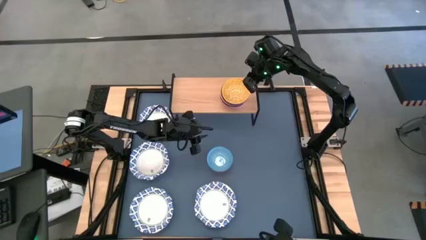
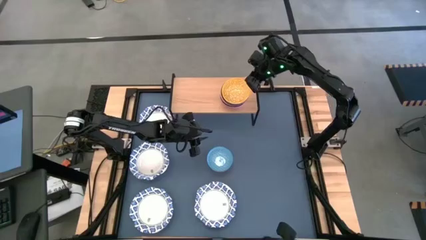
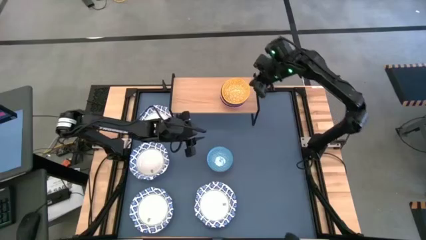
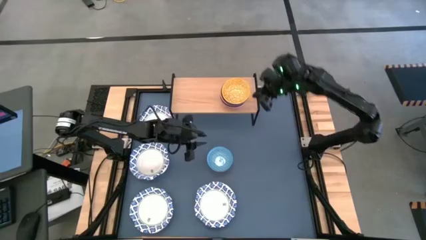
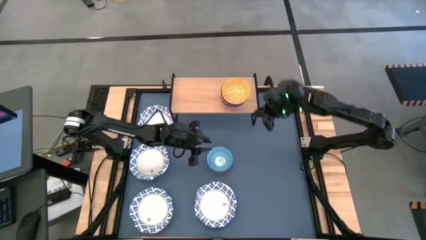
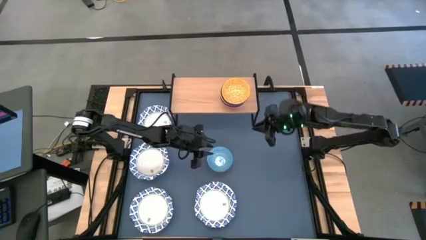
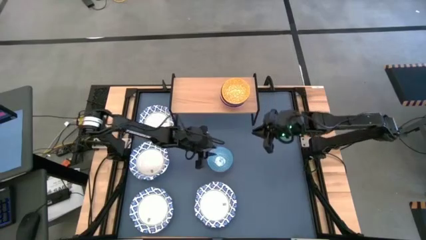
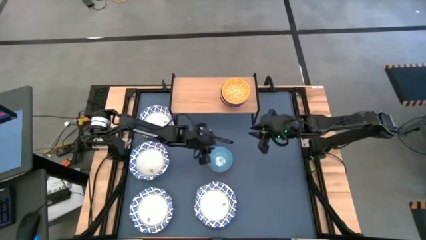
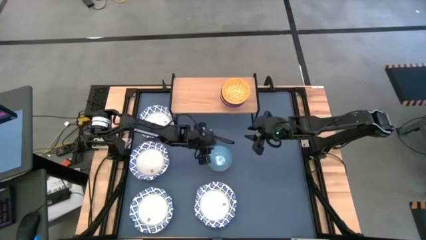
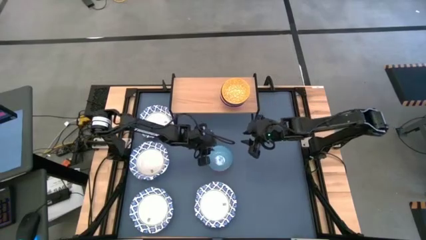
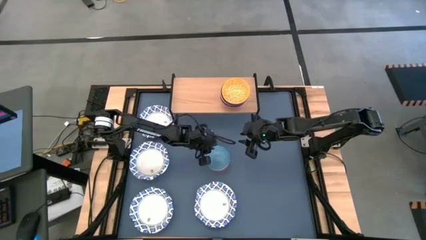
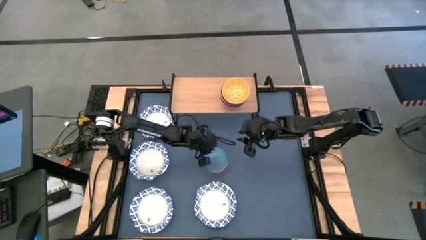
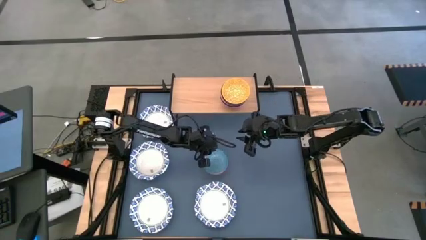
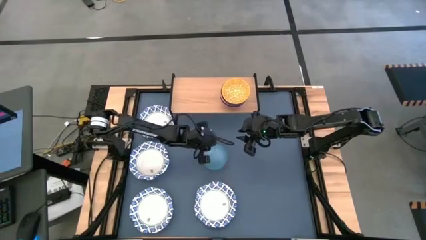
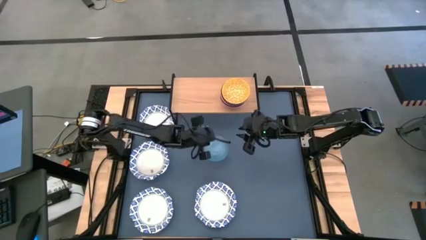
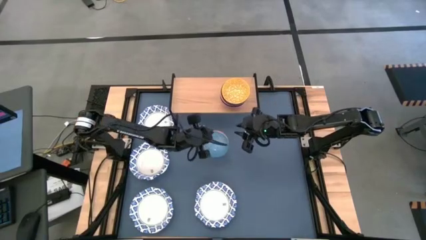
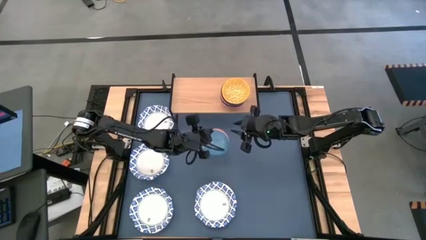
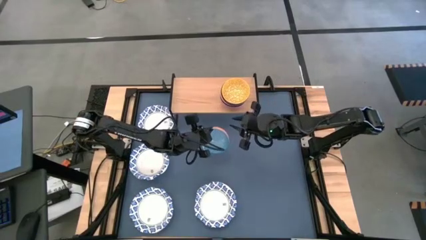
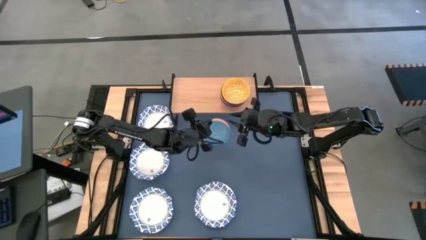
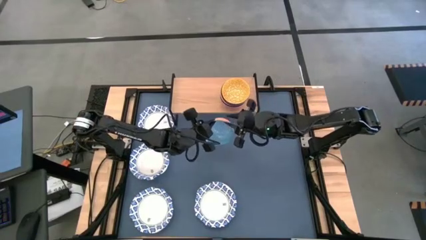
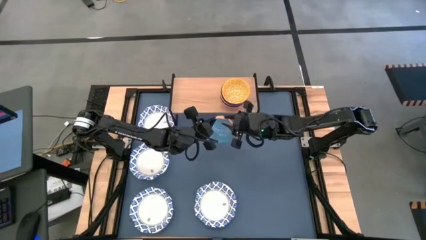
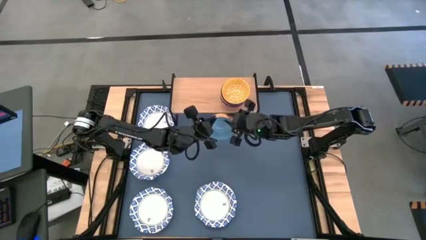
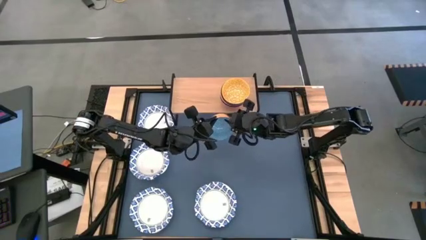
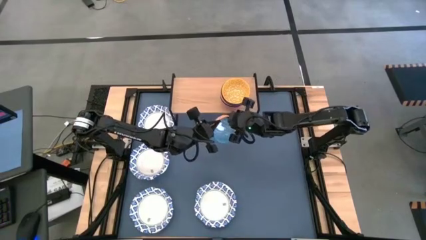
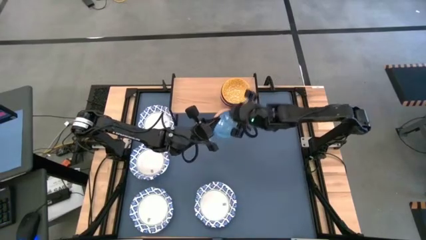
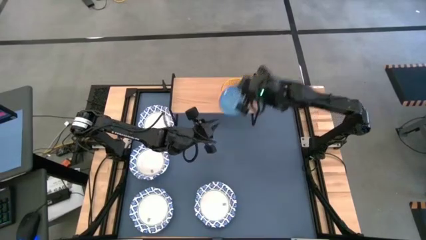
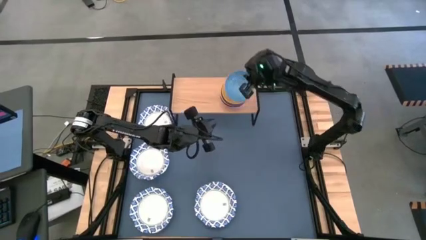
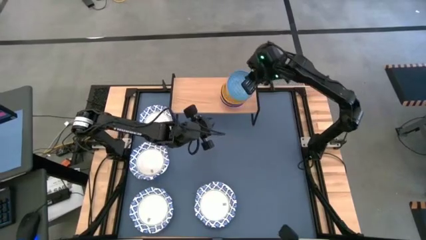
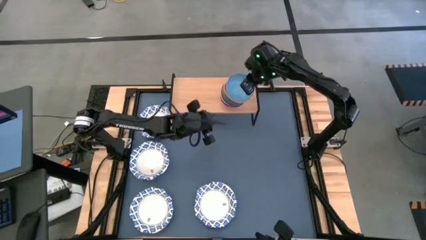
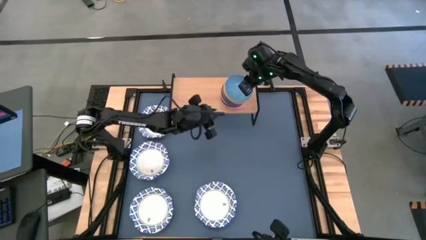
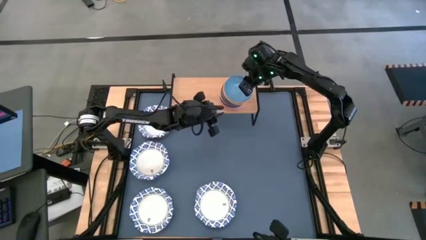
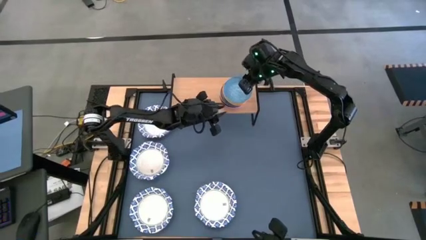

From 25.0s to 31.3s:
Task: Place and stack bowls onto a shelf
Stack the blue patterned bowl on top of the yellow patterned bowl on the shelf

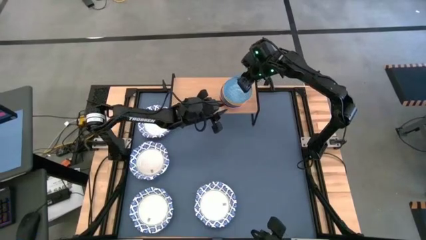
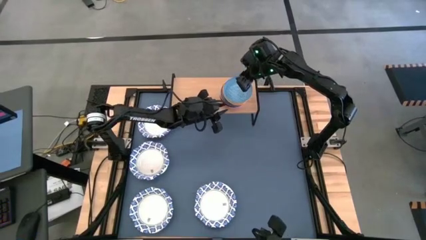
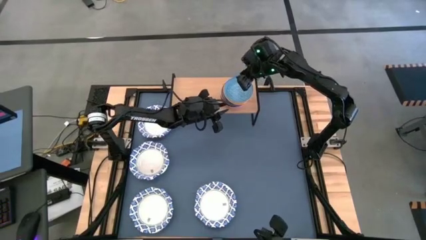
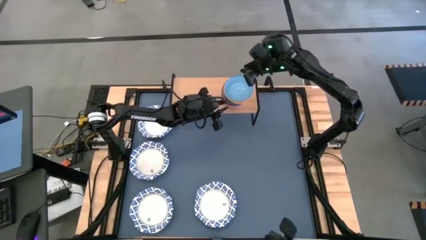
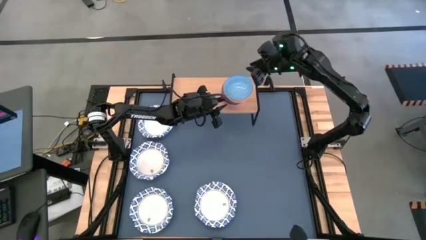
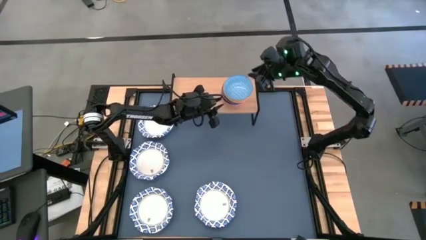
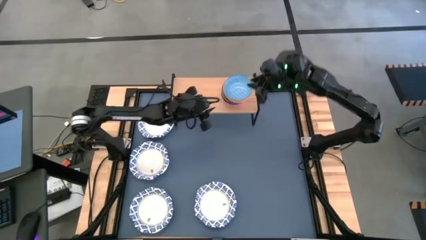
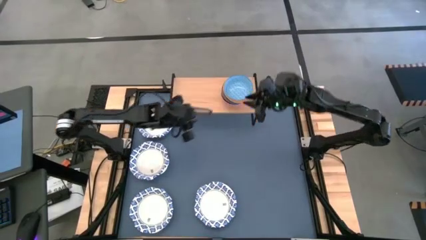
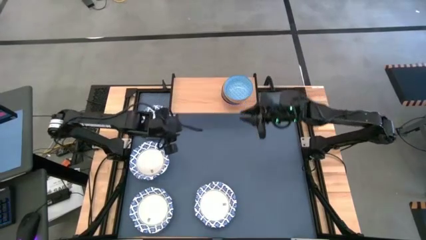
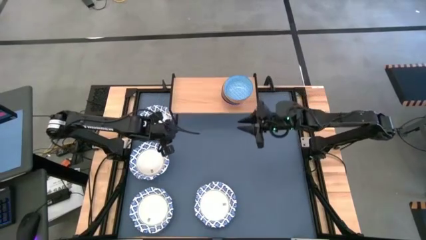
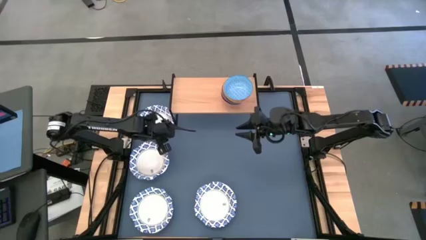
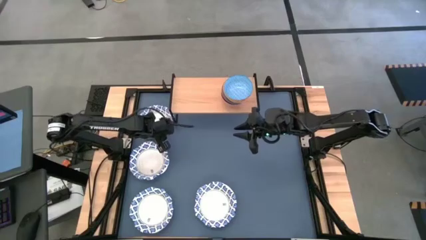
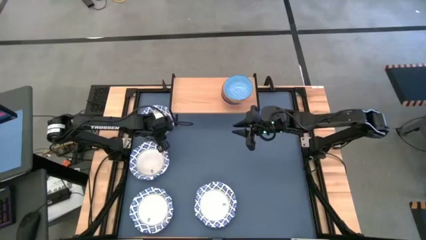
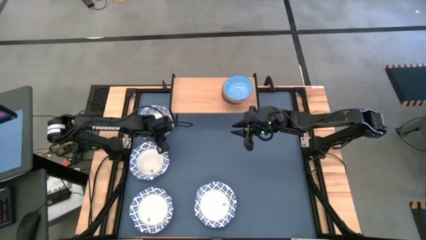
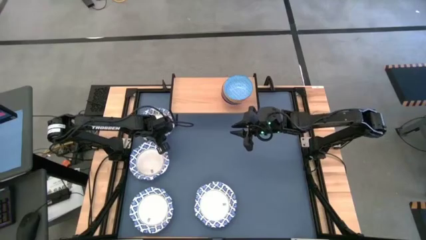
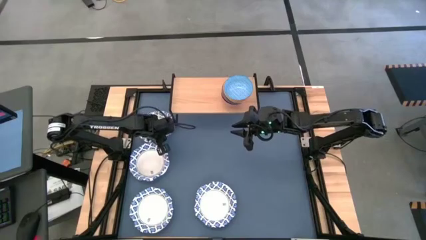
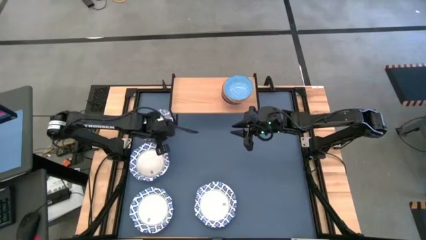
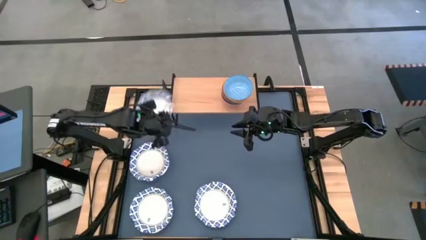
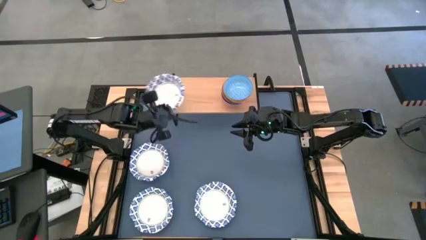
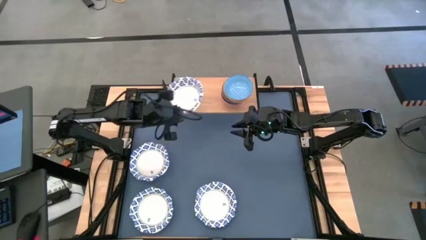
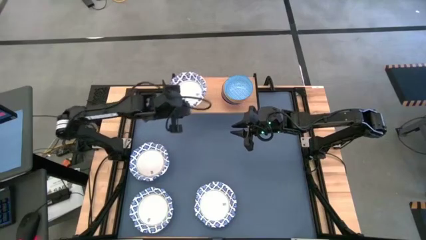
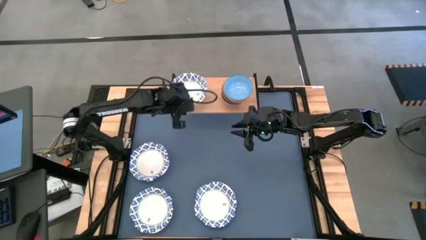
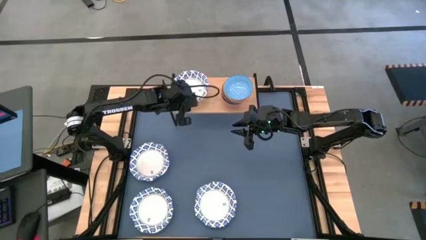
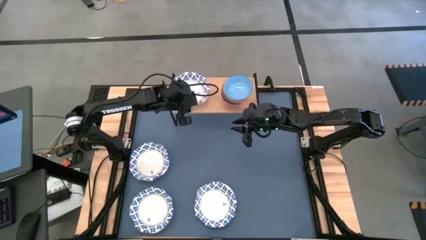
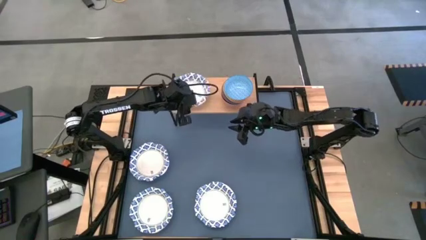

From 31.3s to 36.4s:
Put the top left white patterned bowl on the shelf

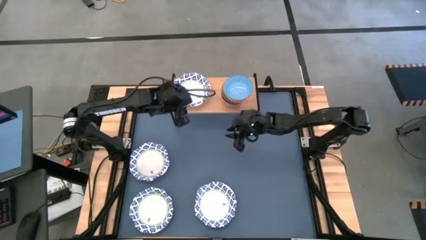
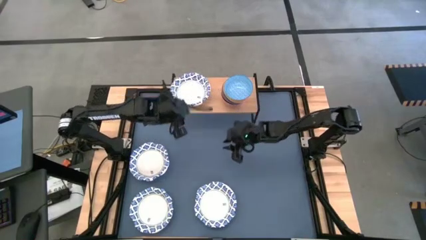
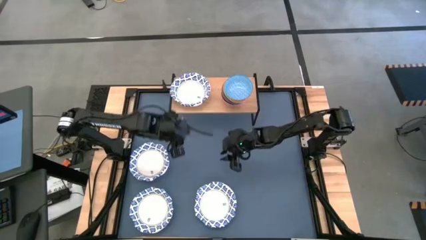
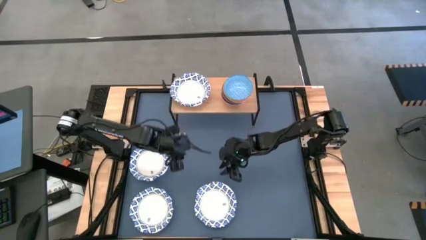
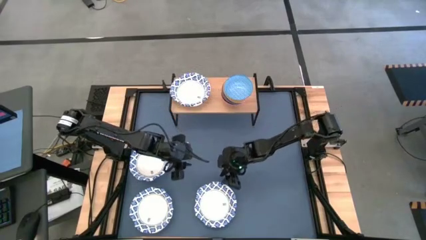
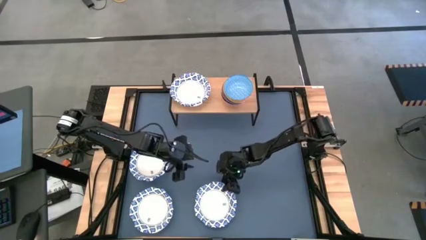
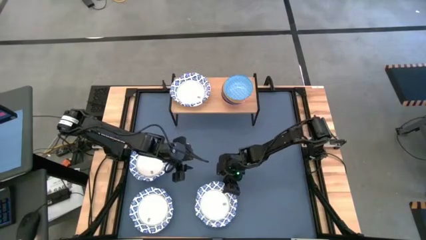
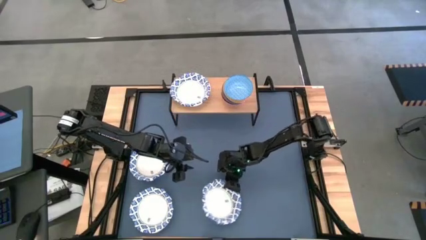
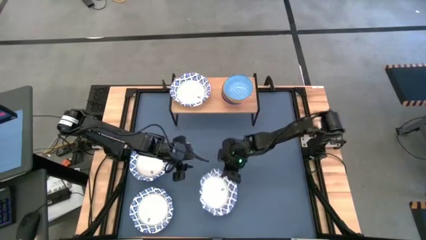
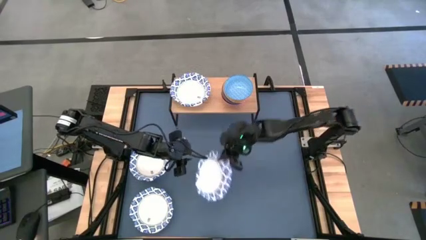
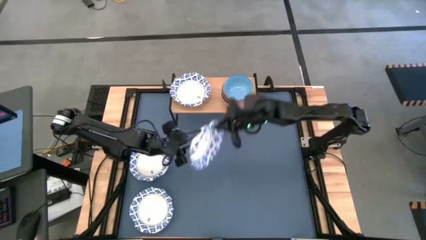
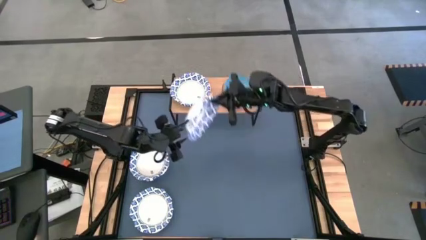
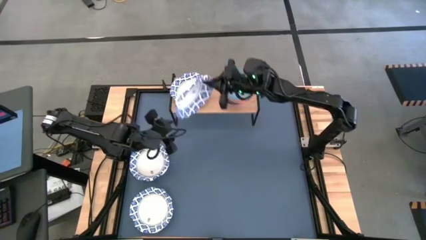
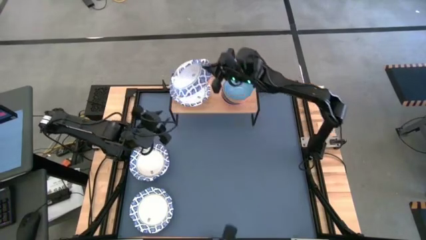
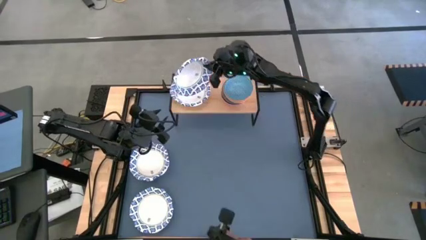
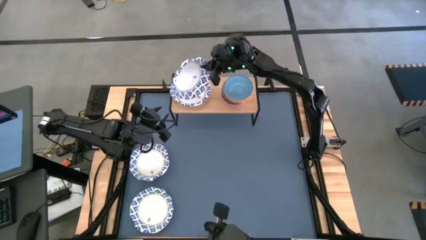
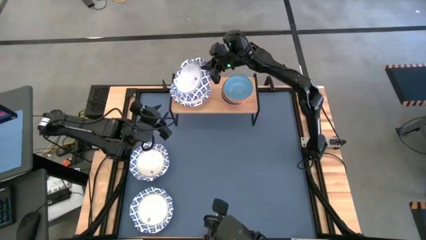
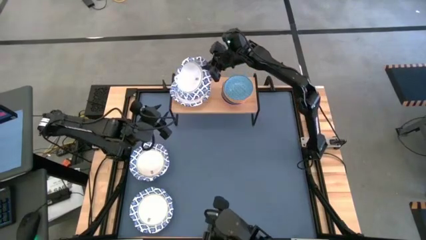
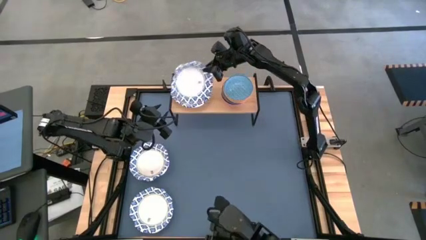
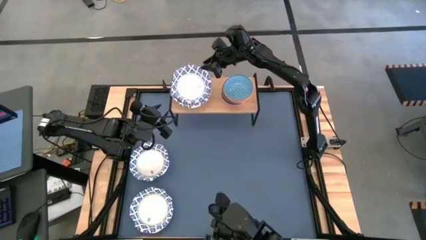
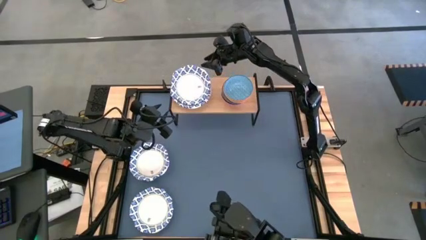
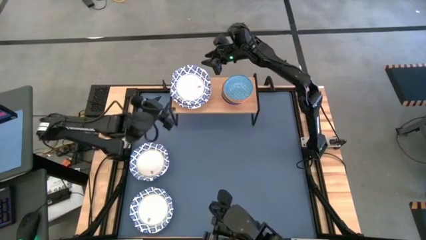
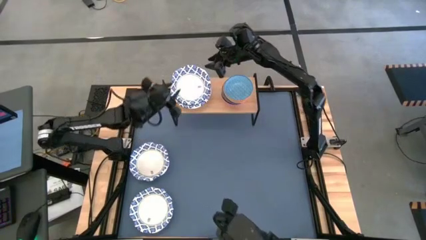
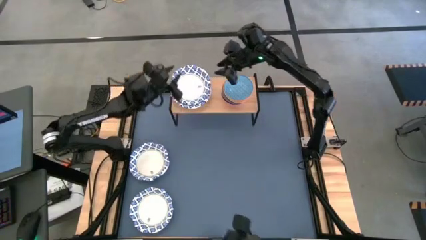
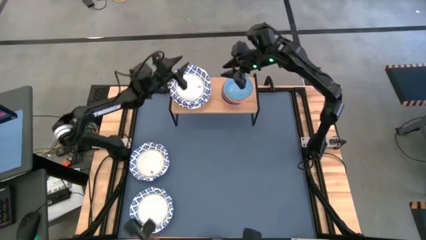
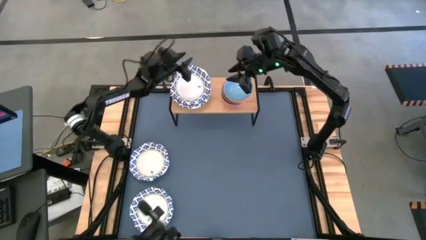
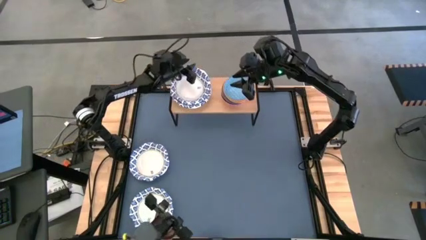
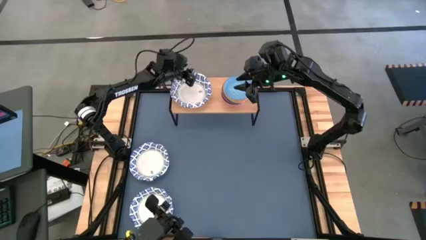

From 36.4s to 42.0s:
Stack the bottom right white patterned bowl on top of the white patterned bowl on the shelf

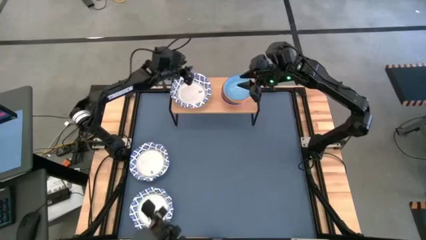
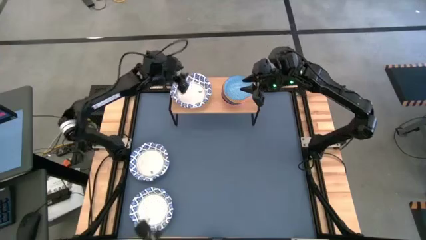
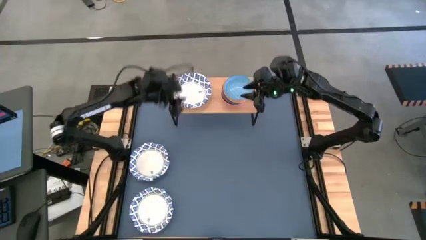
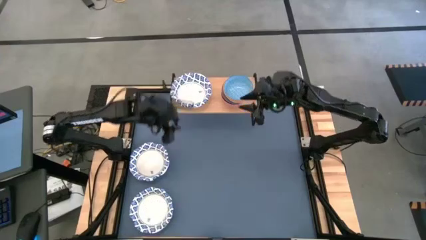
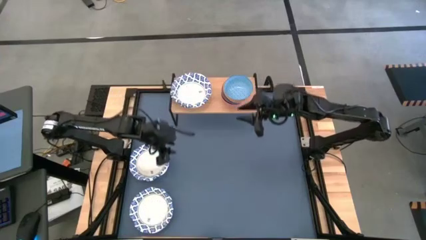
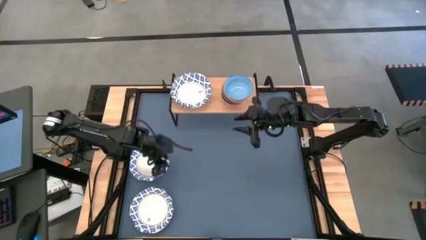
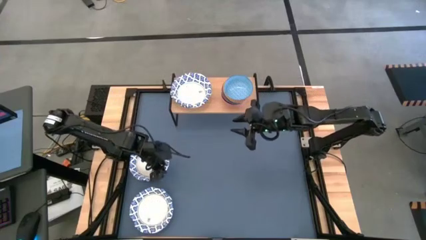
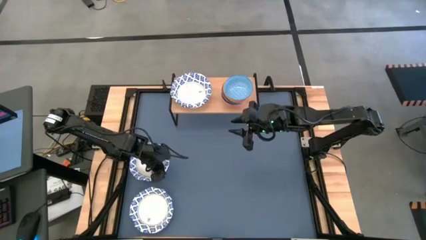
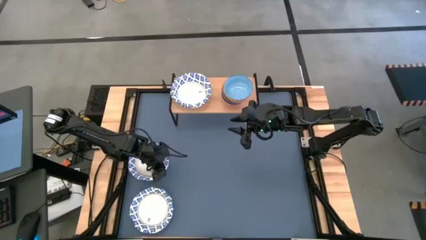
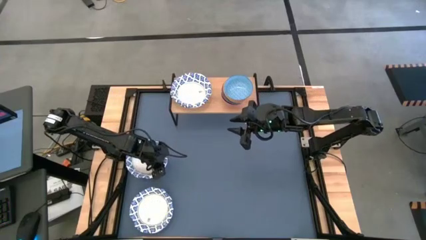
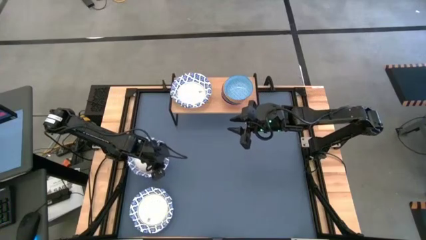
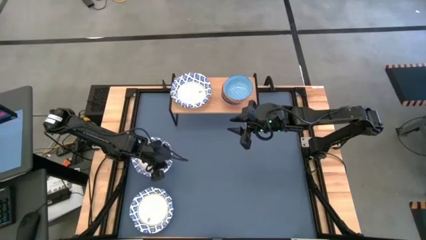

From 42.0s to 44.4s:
Stack the top white patterned bowl on top of the white patterned bowl on the shelf
